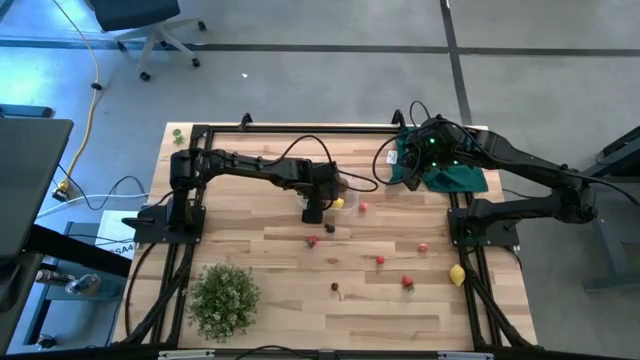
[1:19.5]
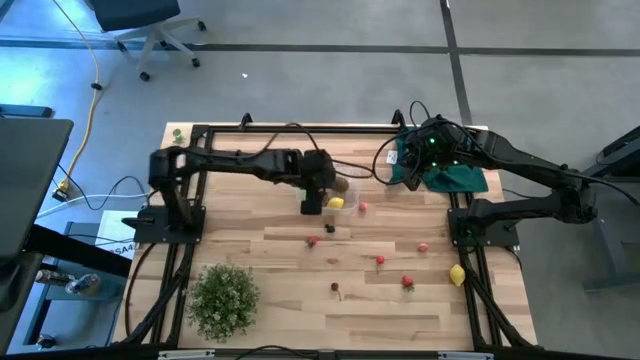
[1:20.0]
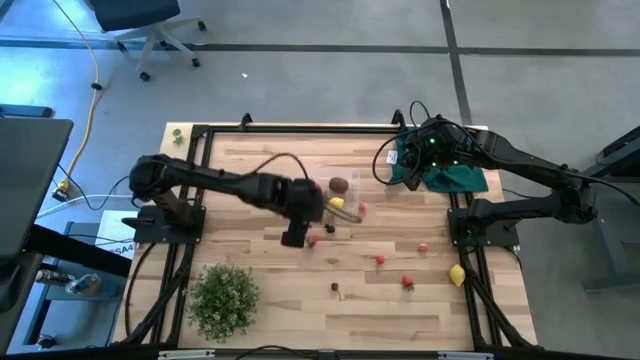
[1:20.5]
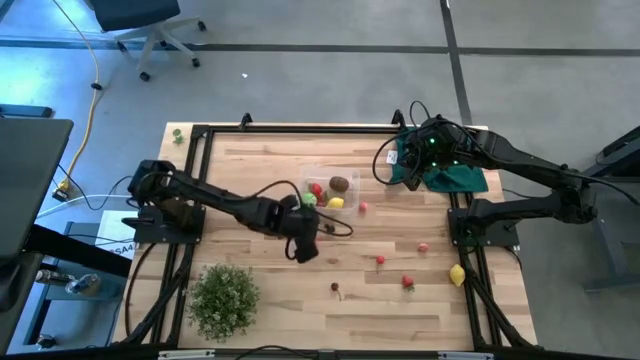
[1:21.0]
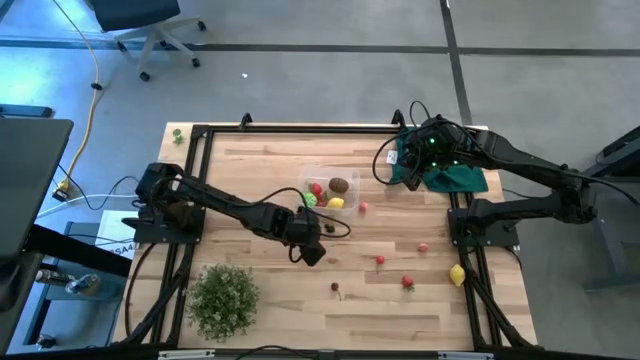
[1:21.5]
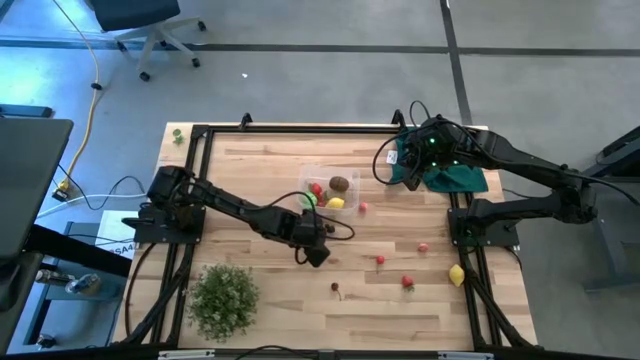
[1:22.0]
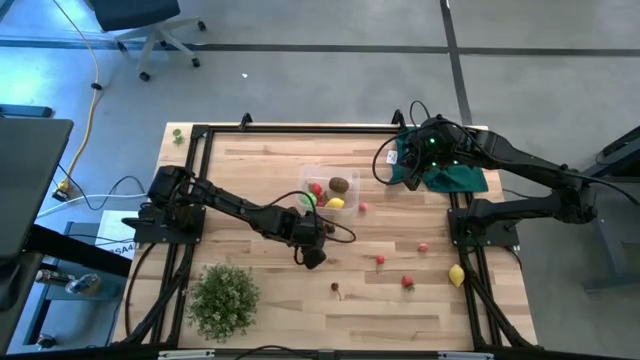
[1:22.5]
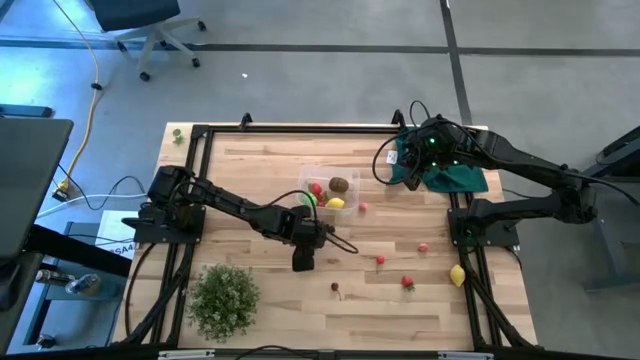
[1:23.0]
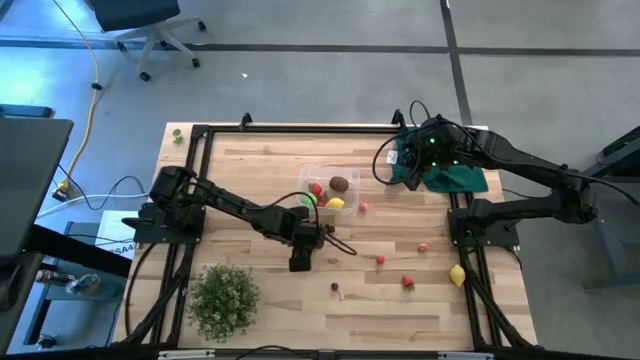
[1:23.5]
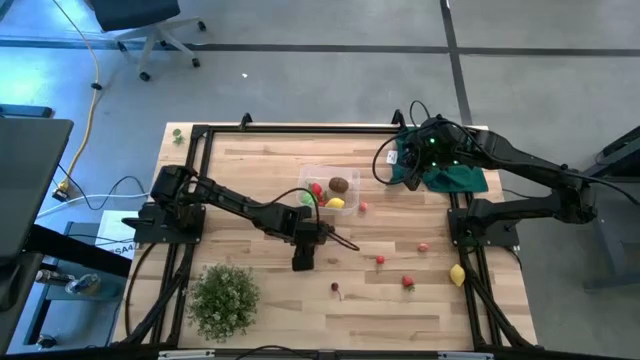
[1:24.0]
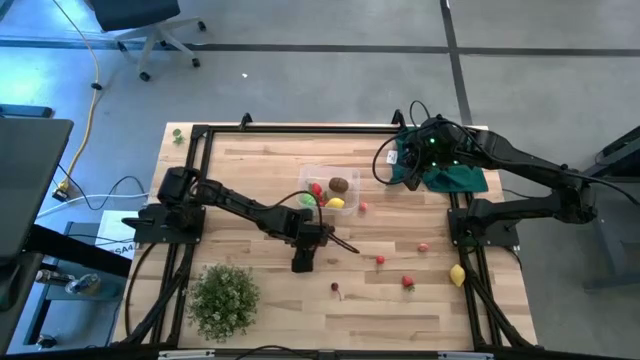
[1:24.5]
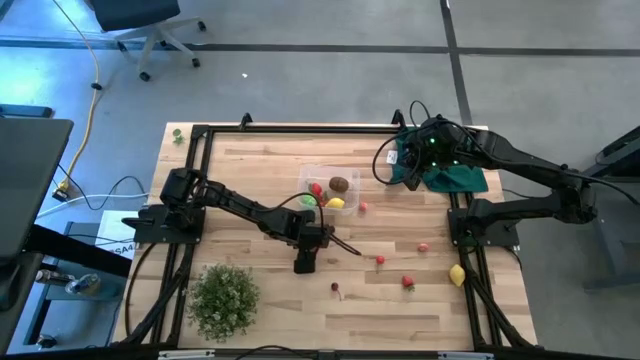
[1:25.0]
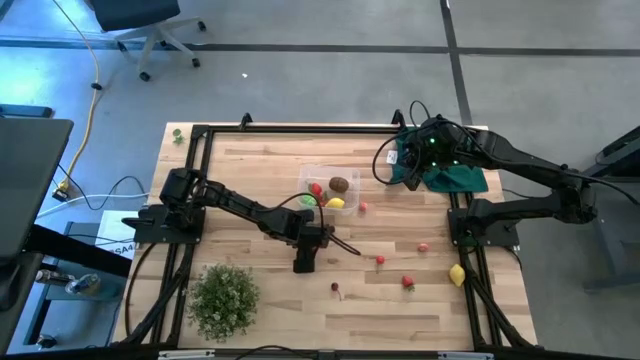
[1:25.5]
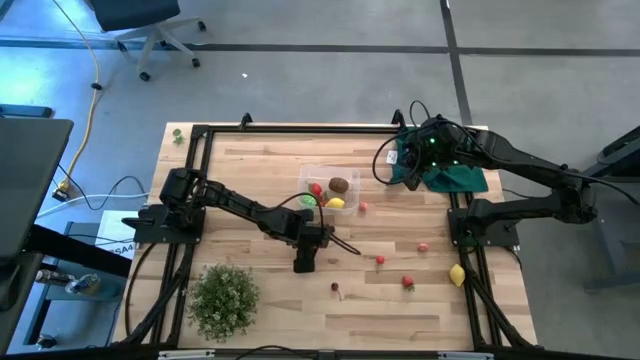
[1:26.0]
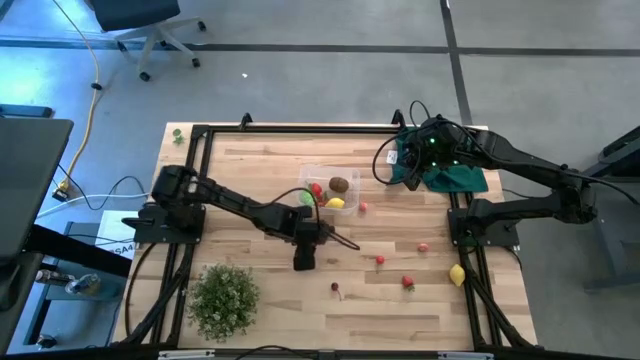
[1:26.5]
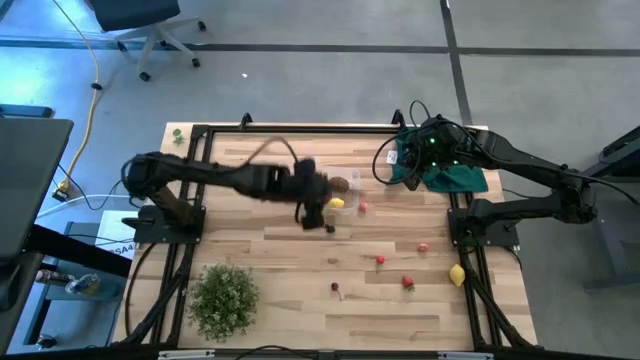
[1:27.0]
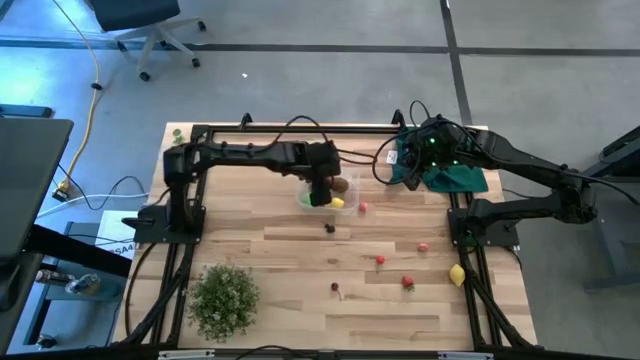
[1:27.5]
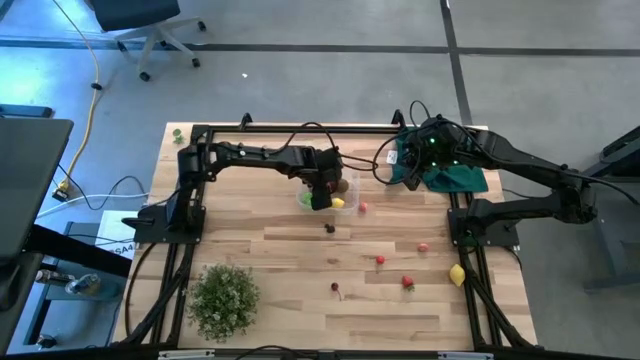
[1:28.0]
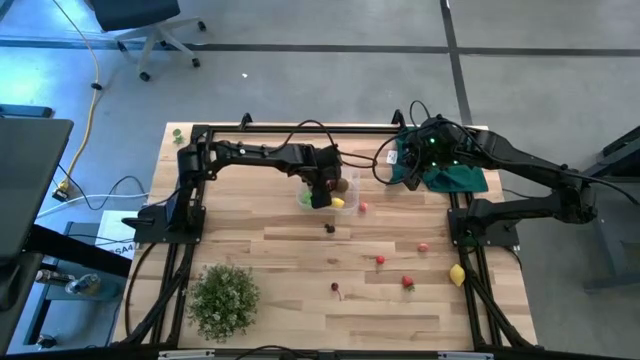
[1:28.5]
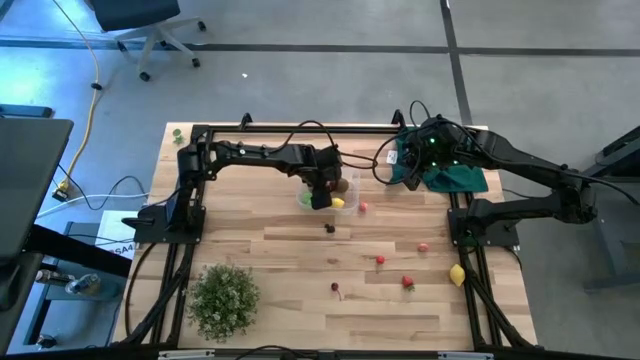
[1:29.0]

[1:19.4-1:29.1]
Task: Pick and placing Produce into tupperware
Put the red strawberry into the transparent bin

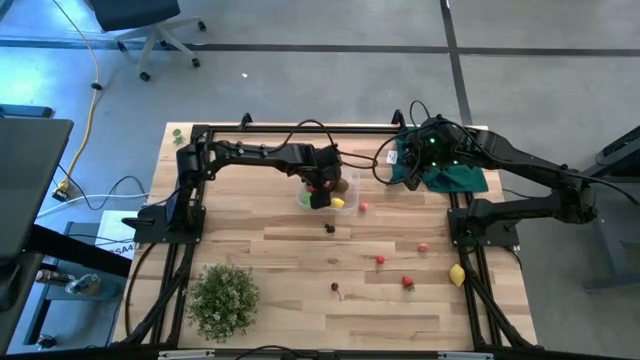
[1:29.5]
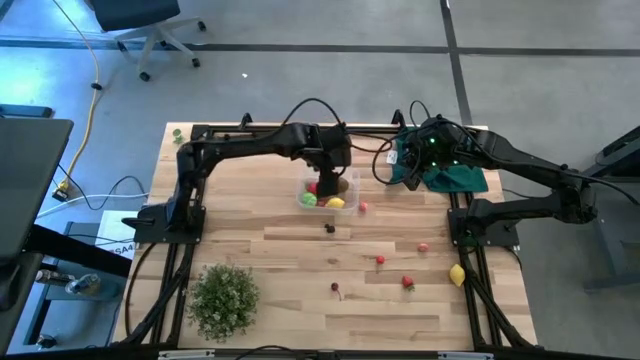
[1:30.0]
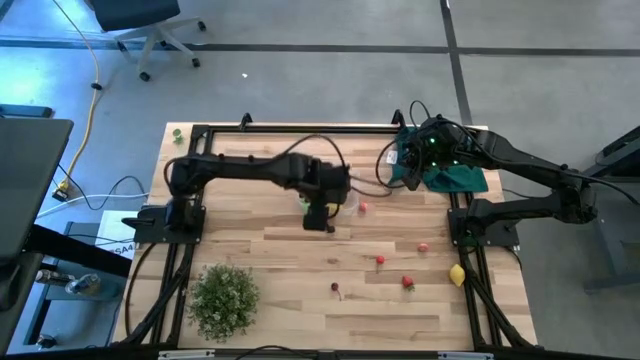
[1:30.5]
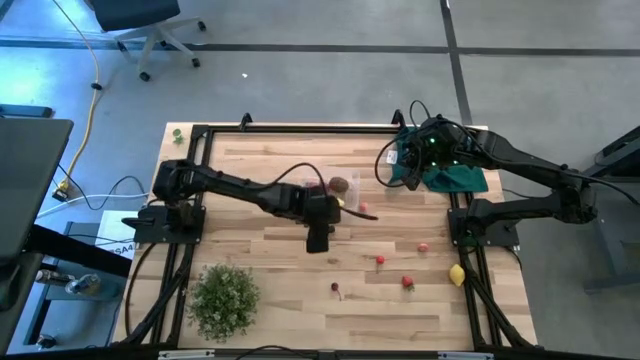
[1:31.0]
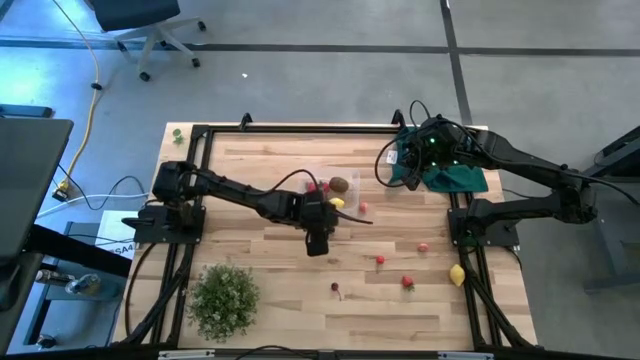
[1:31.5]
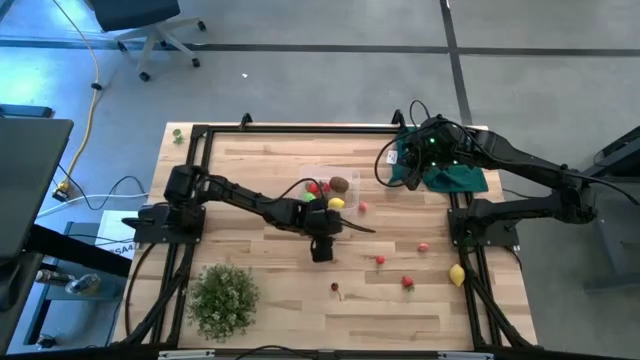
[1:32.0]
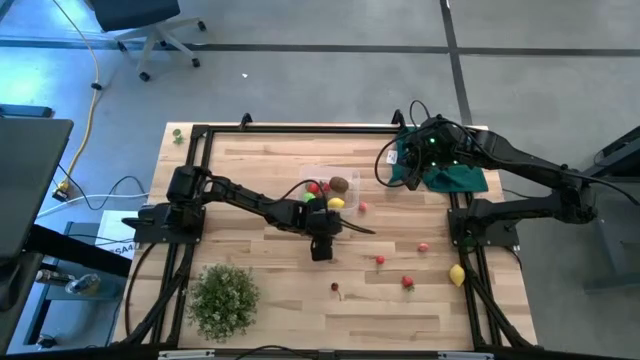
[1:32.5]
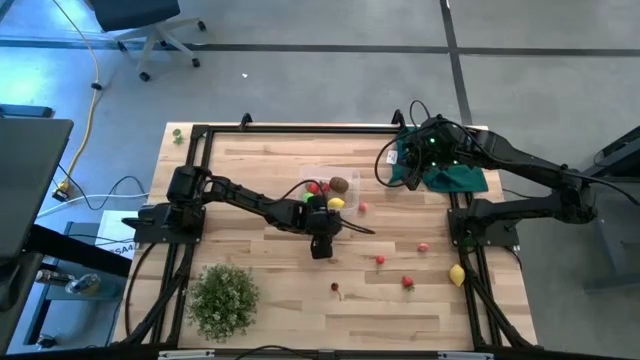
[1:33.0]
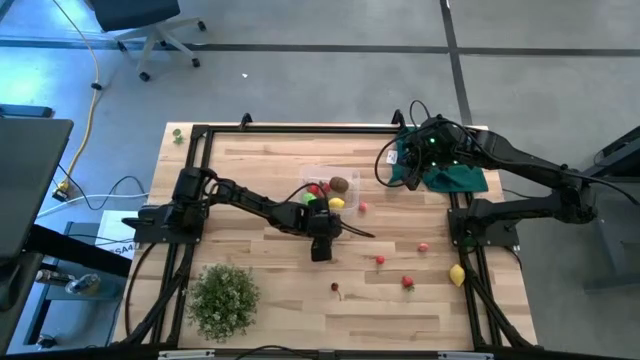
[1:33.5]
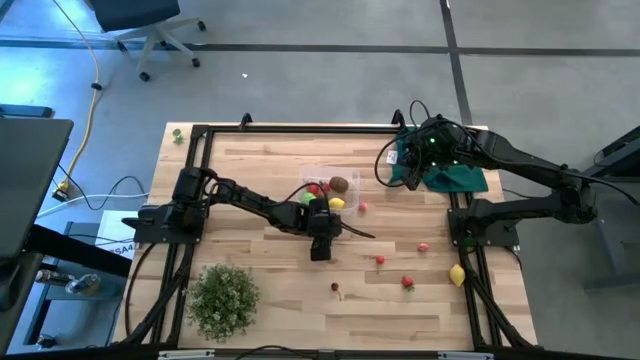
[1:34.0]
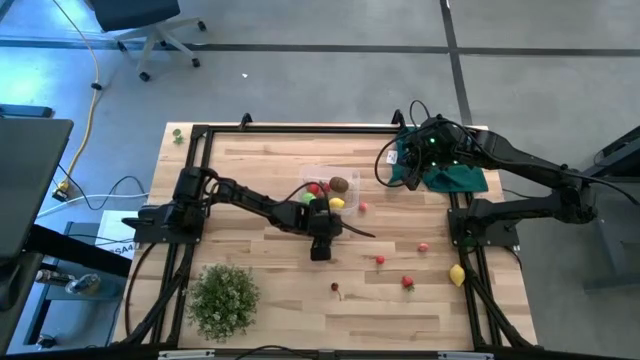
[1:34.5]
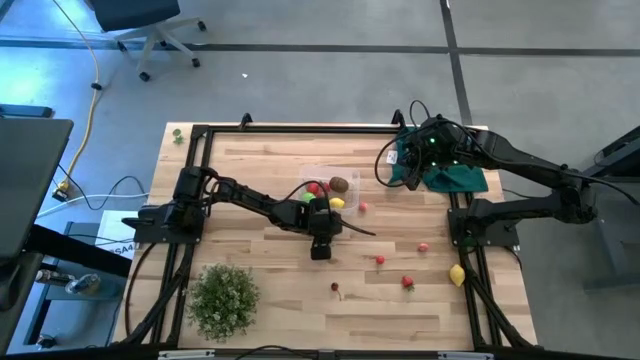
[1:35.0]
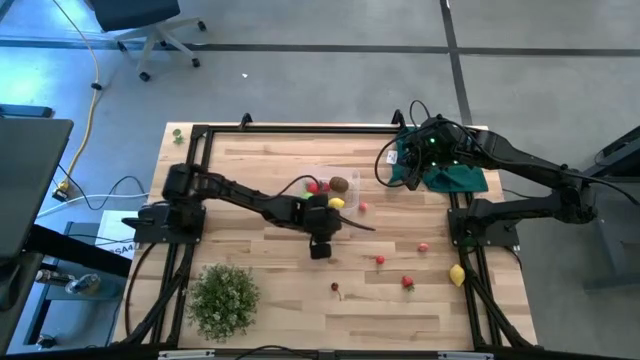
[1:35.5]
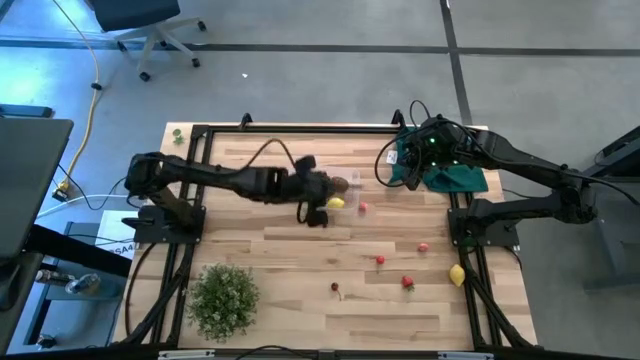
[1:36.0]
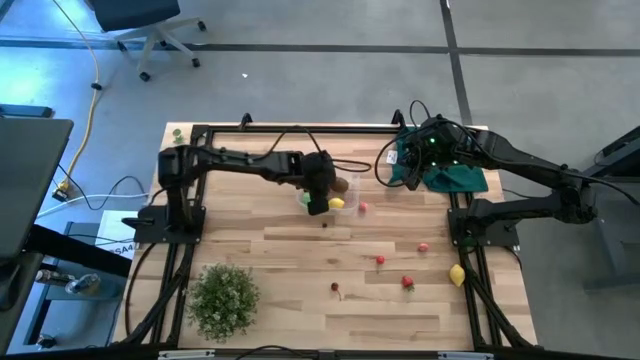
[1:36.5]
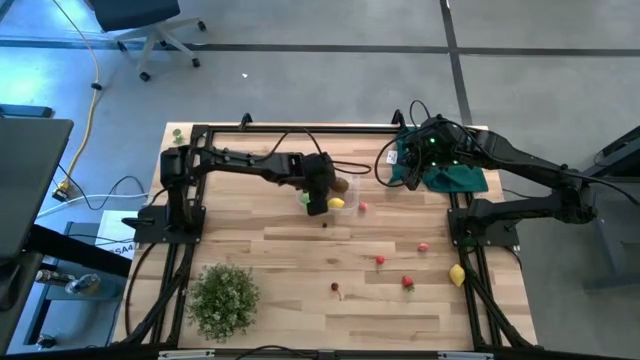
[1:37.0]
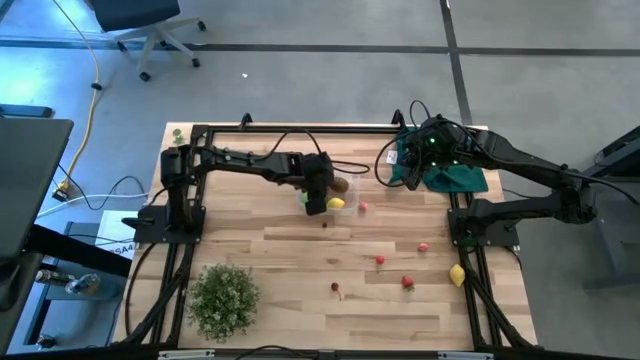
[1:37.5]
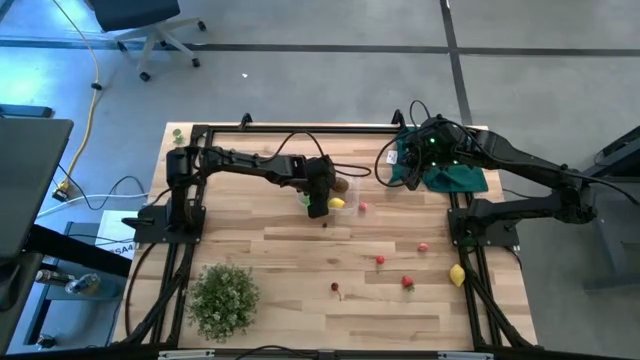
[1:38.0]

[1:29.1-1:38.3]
Put the blackberry into the transparent bin

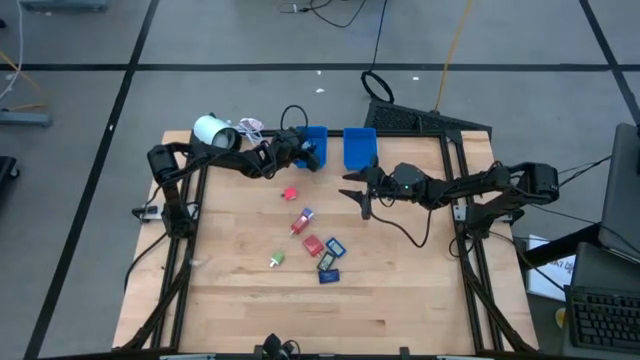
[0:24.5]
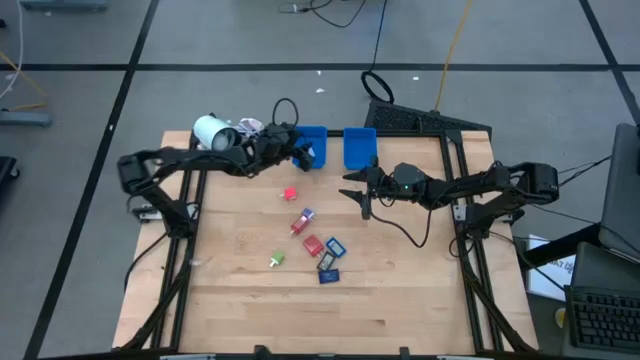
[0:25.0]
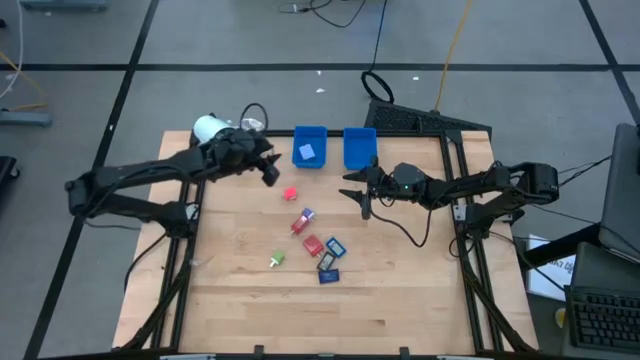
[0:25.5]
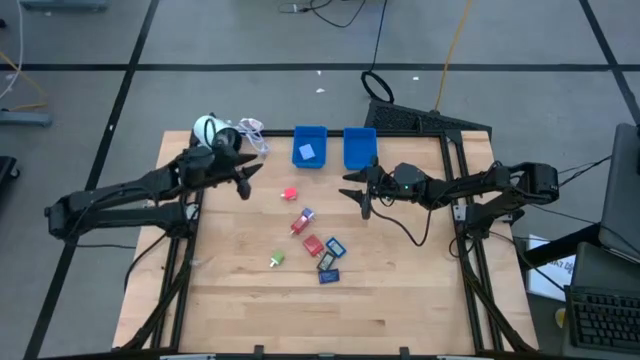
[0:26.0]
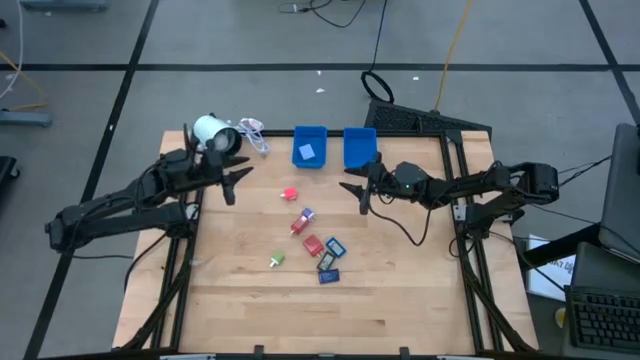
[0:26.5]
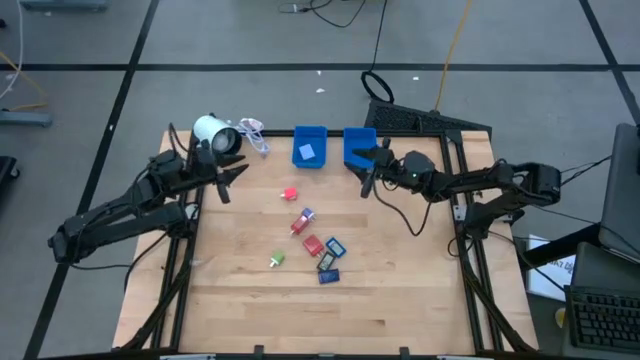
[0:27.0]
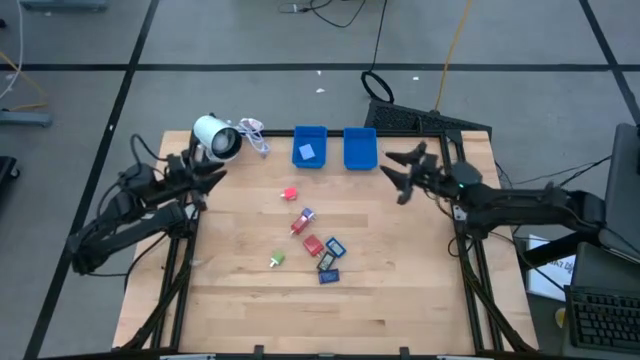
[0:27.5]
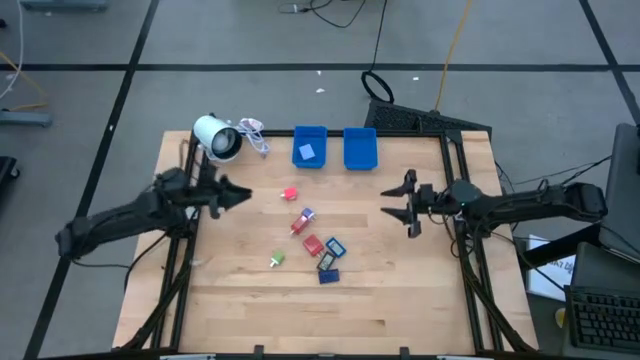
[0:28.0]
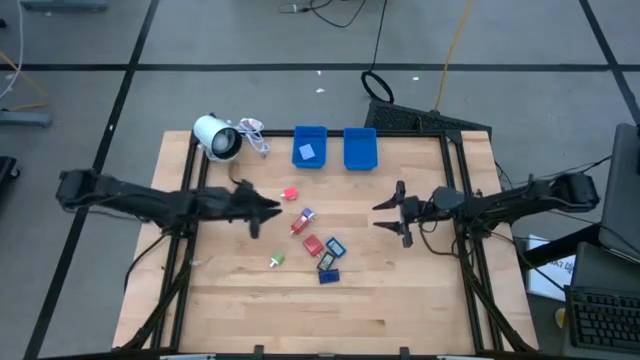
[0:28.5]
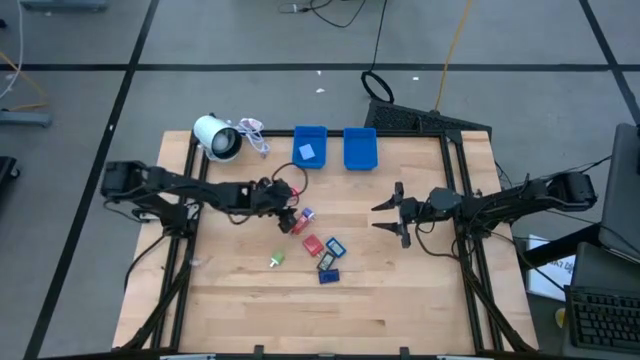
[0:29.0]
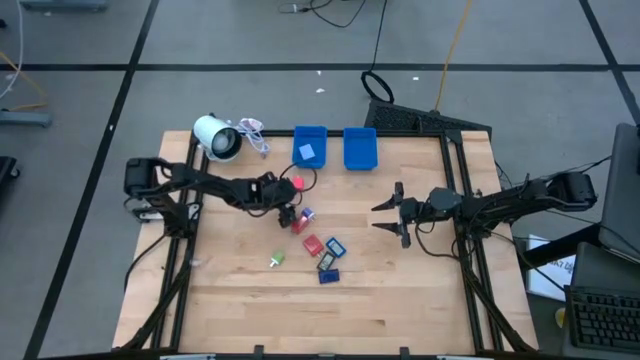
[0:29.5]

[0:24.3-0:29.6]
Task: Pick & Place Office items
Put the pink charger adapter into the left basket
